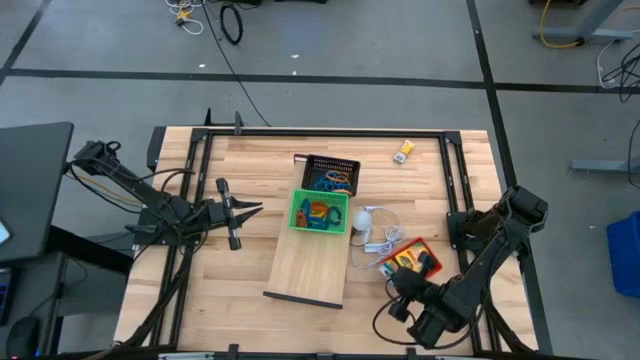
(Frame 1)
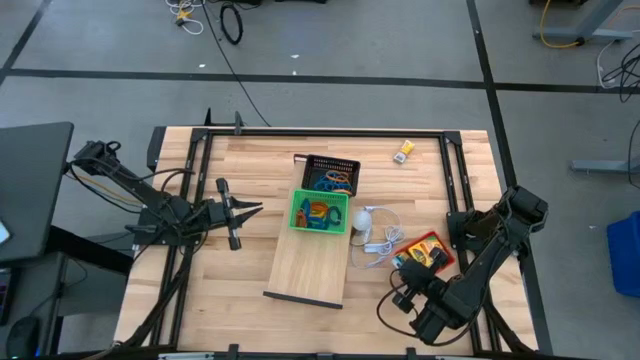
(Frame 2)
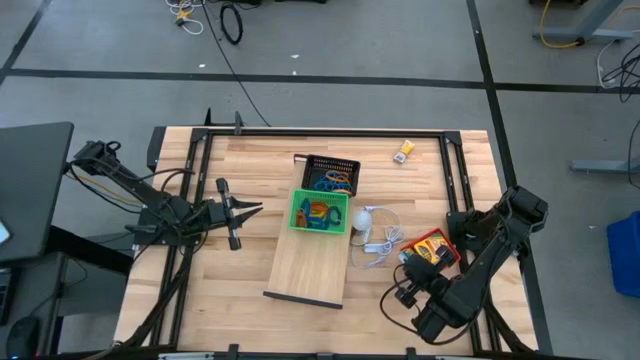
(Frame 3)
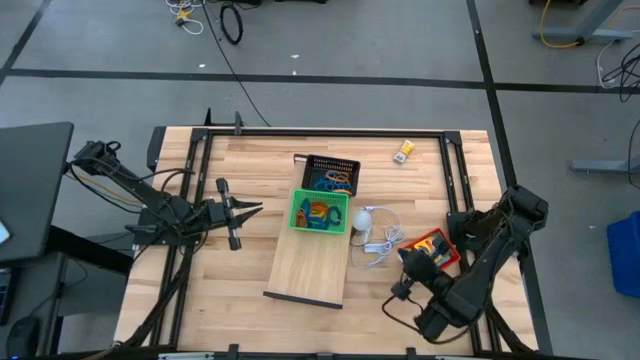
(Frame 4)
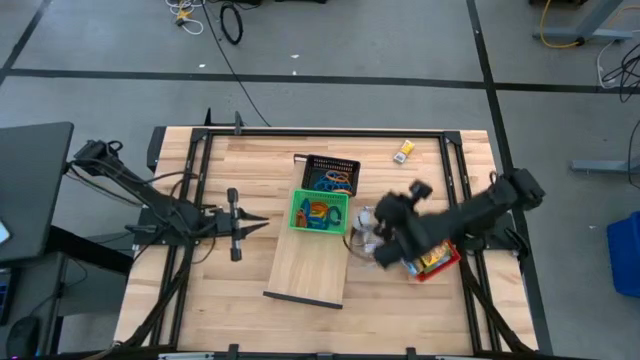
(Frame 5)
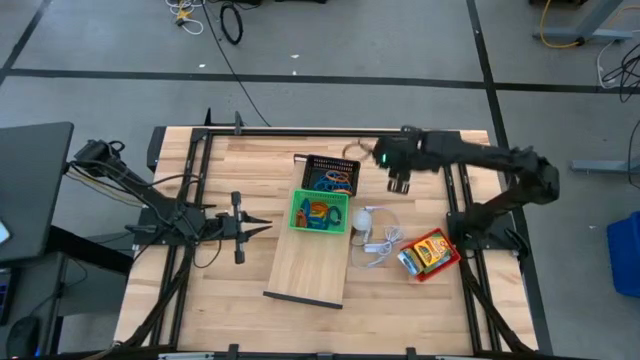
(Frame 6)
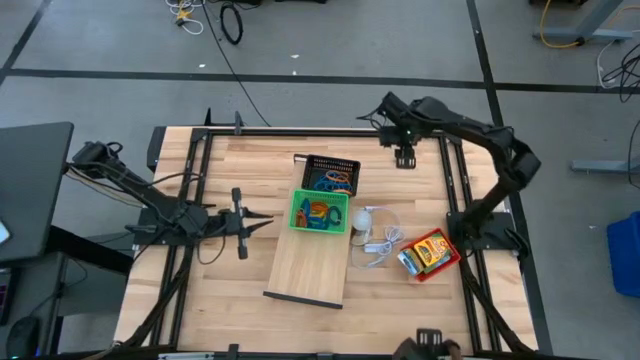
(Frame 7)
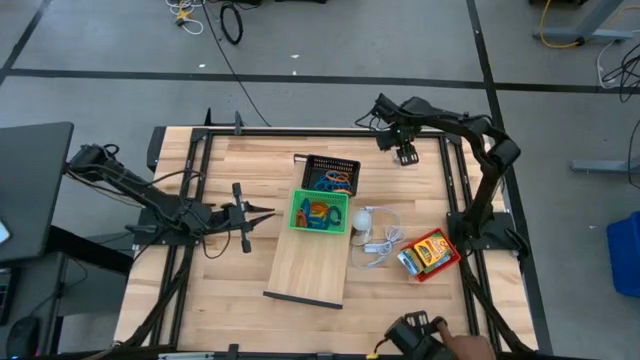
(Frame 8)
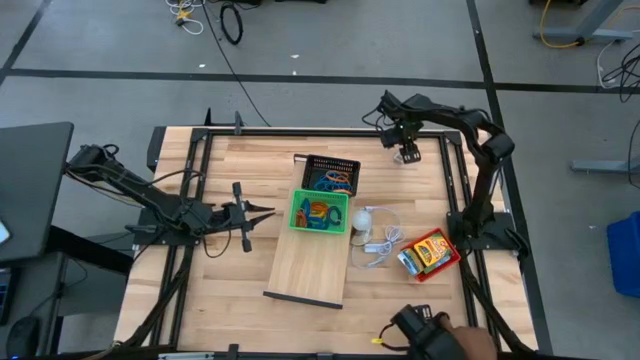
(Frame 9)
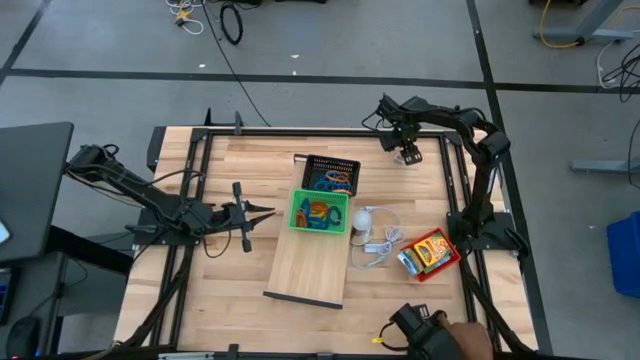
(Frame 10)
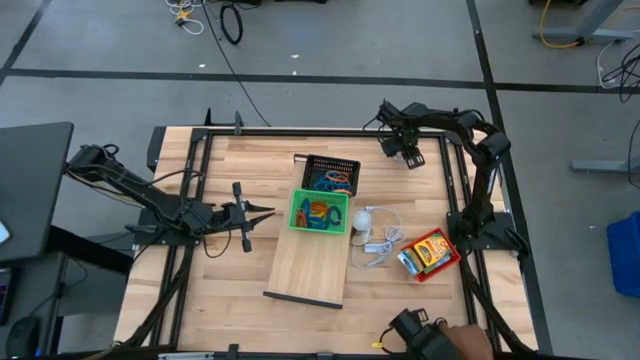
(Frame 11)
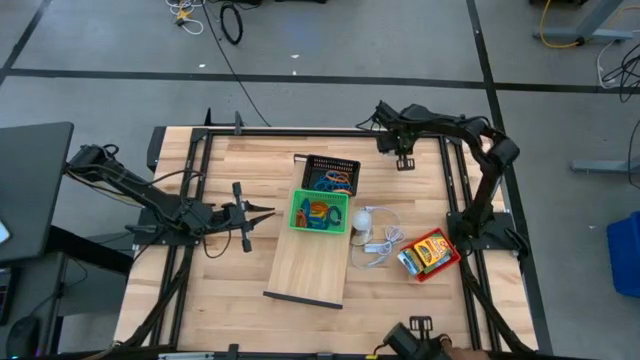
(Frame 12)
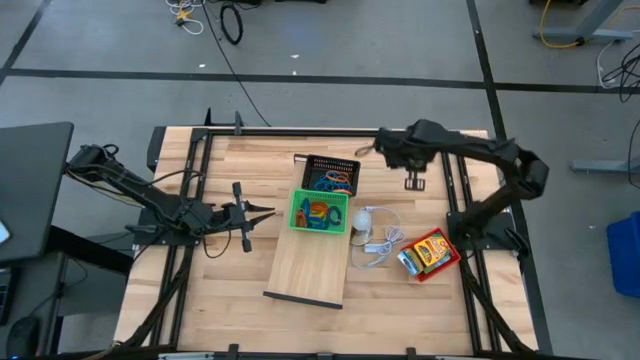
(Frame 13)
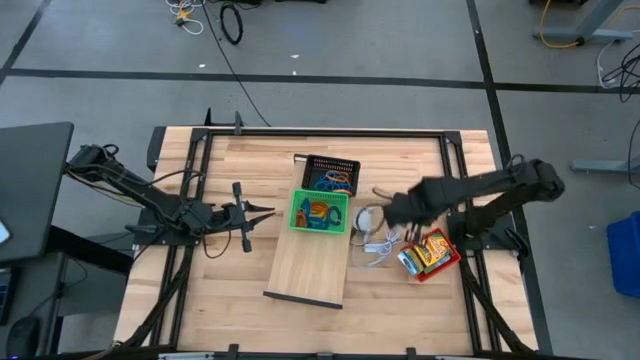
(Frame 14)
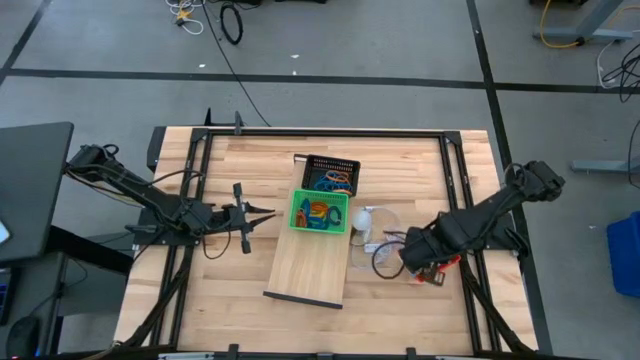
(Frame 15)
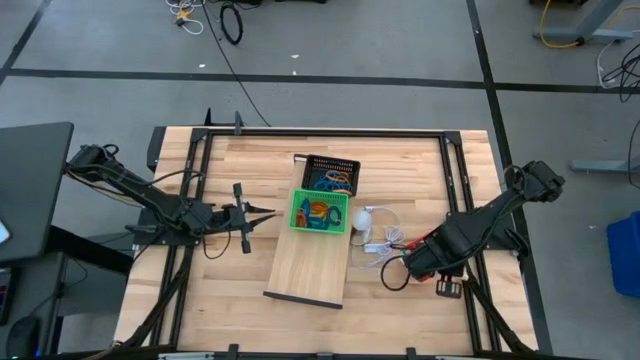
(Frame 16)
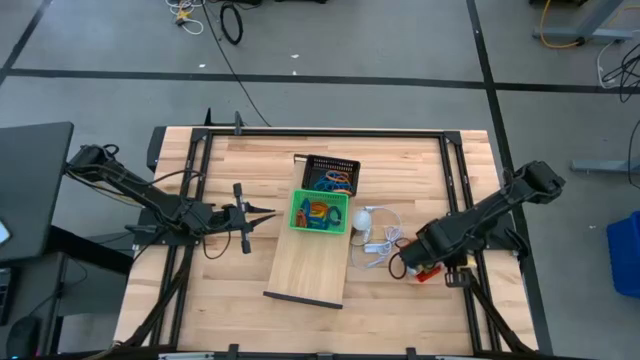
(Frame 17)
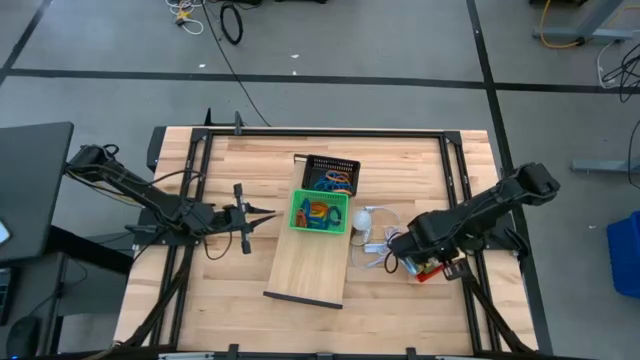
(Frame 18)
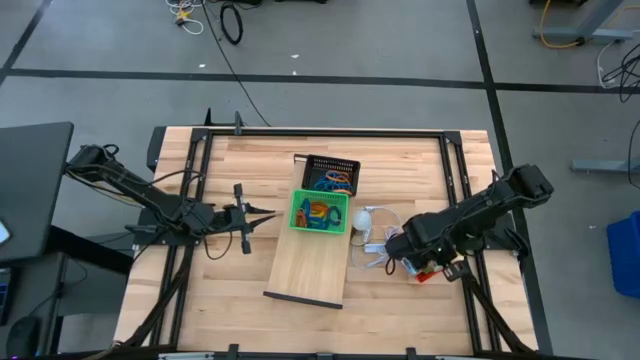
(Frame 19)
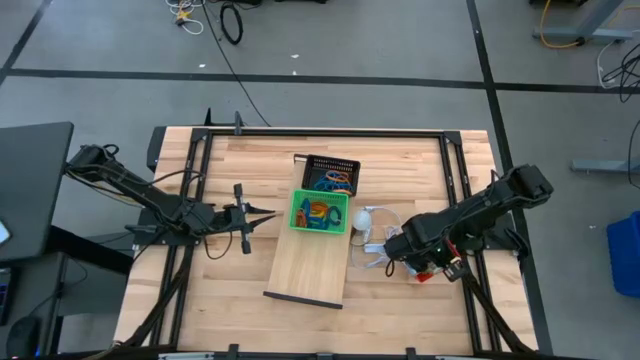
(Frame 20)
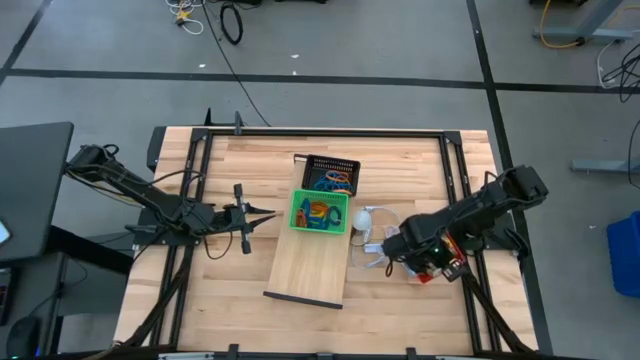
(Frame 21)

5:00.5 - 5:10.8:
Task: Pick & Place Office Desk Supplies
Put the bag of crayons into the red bin

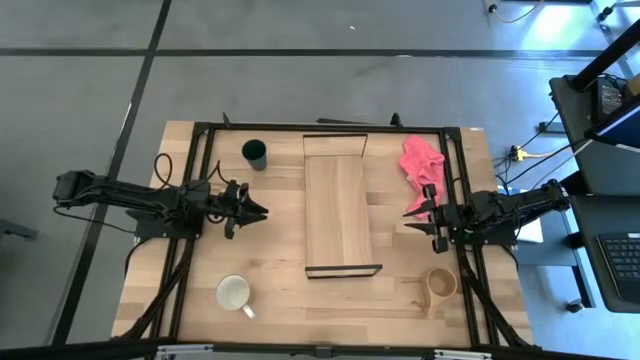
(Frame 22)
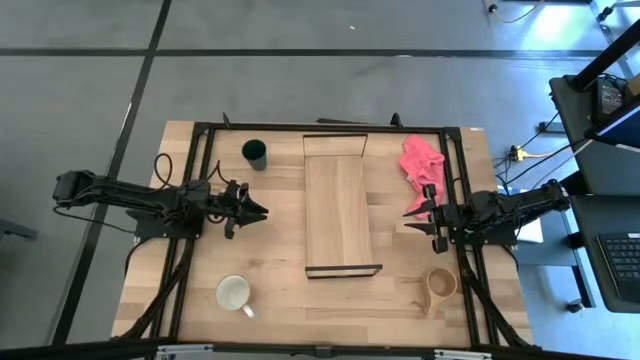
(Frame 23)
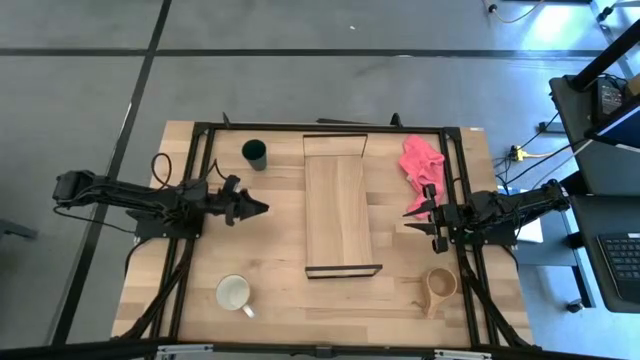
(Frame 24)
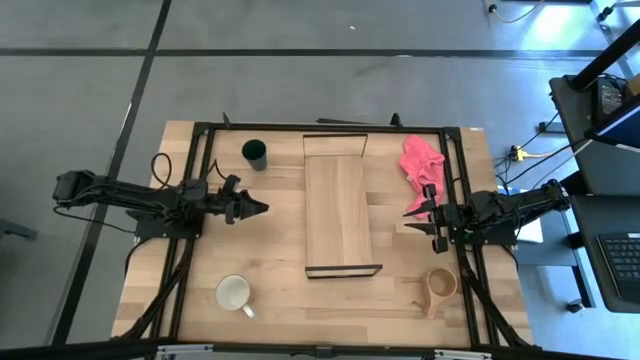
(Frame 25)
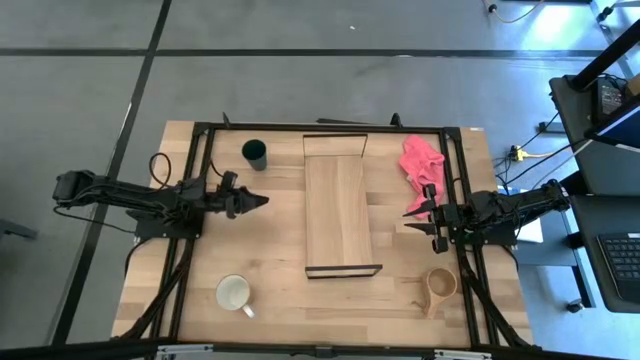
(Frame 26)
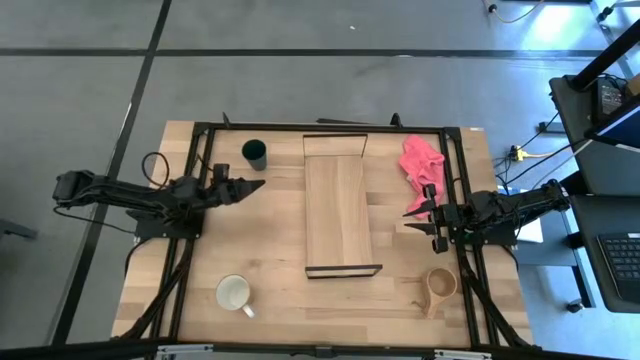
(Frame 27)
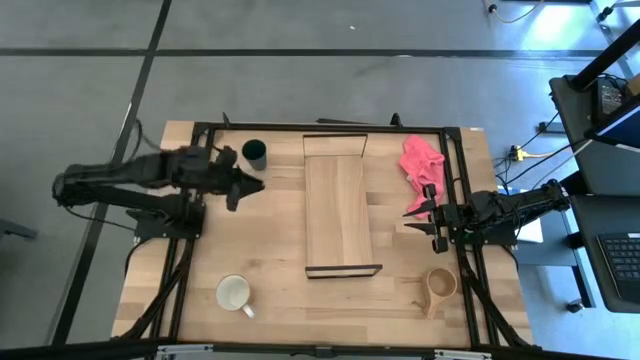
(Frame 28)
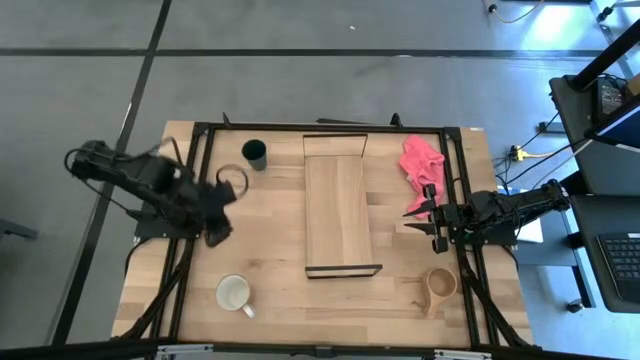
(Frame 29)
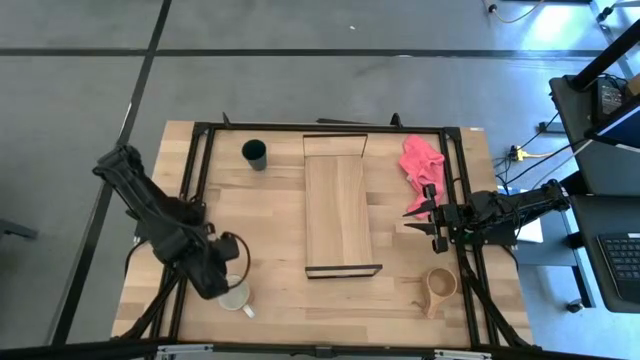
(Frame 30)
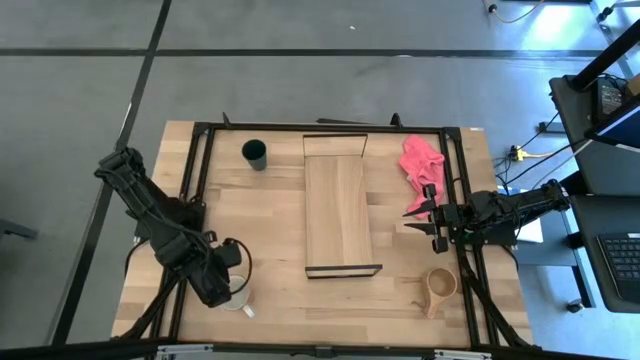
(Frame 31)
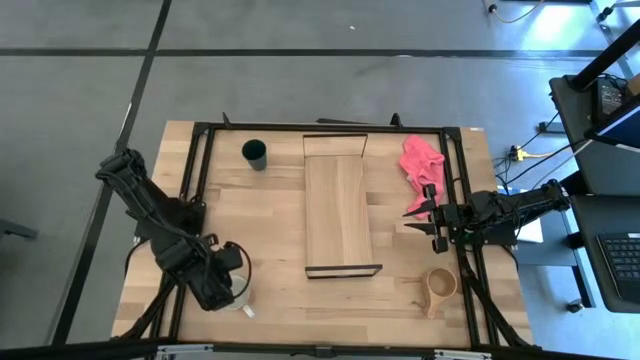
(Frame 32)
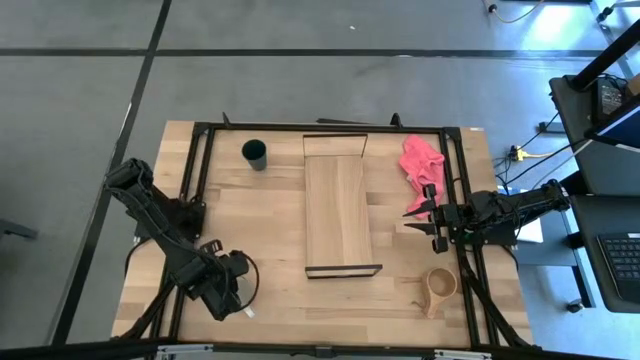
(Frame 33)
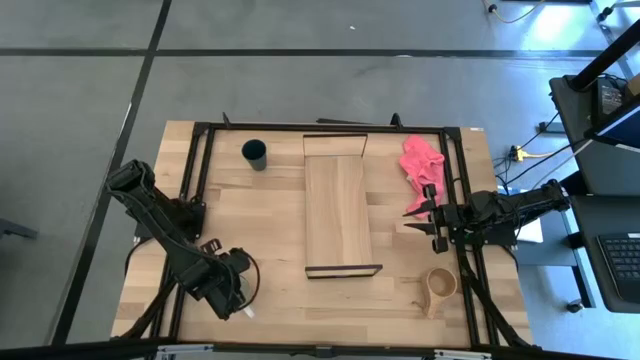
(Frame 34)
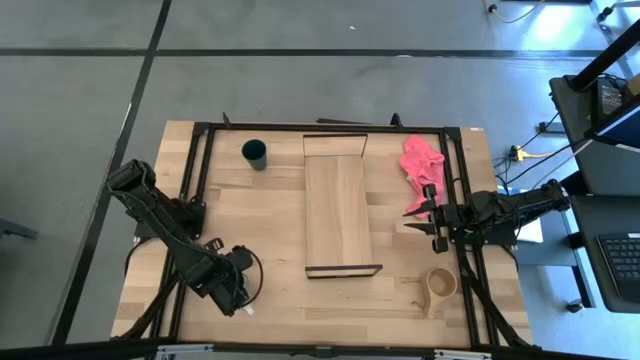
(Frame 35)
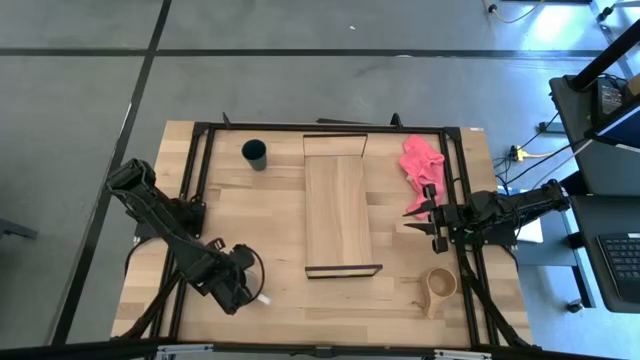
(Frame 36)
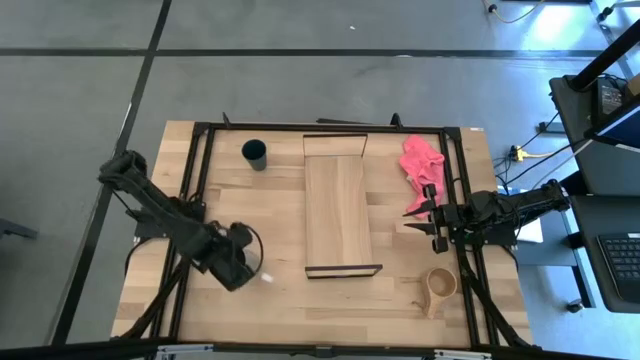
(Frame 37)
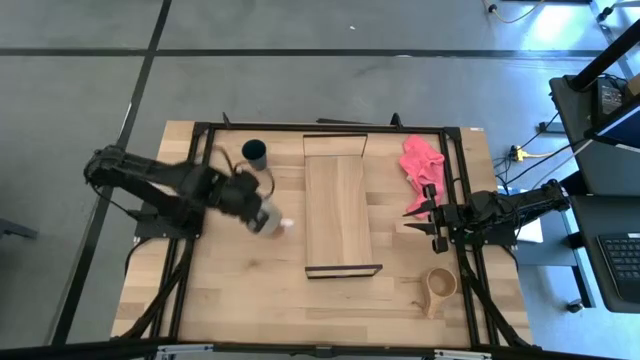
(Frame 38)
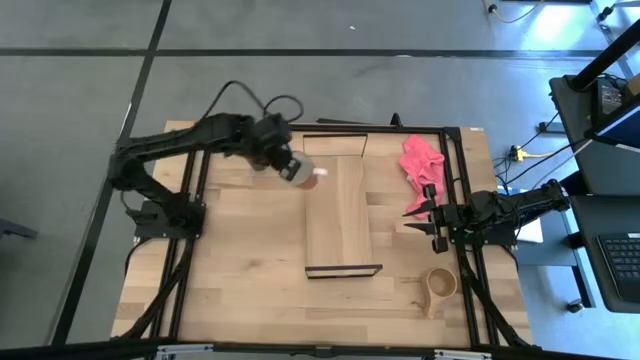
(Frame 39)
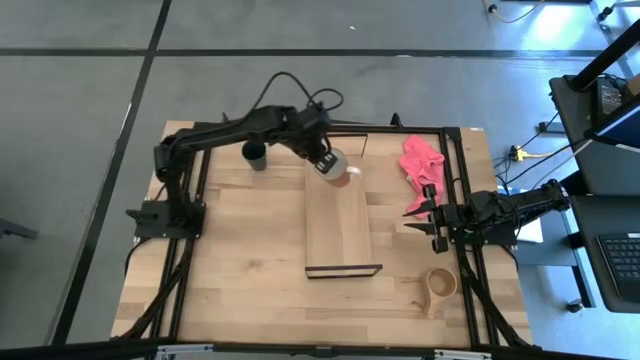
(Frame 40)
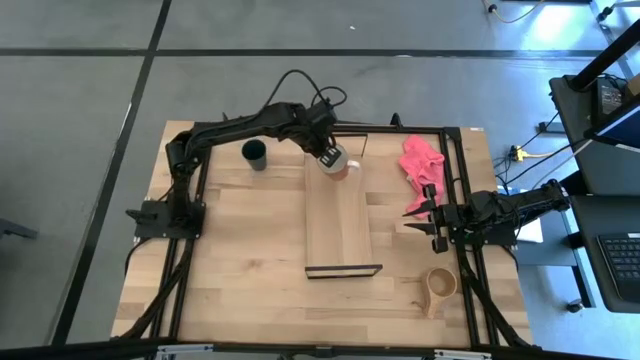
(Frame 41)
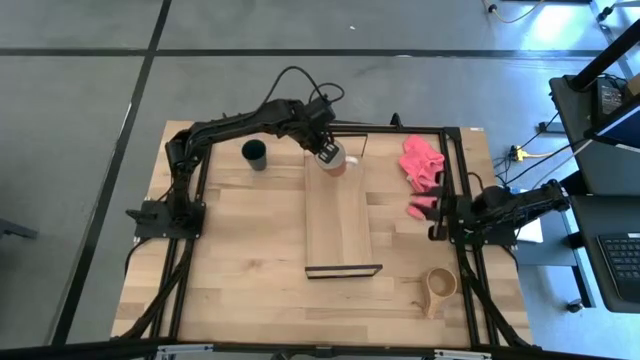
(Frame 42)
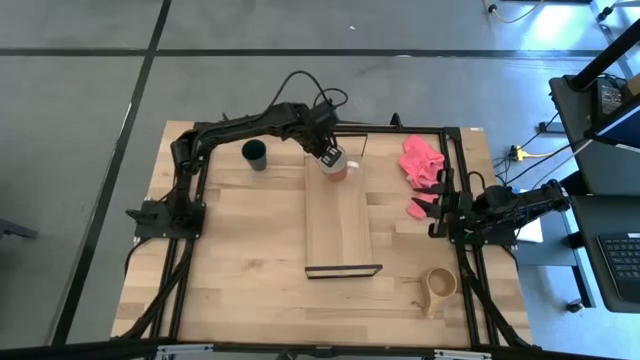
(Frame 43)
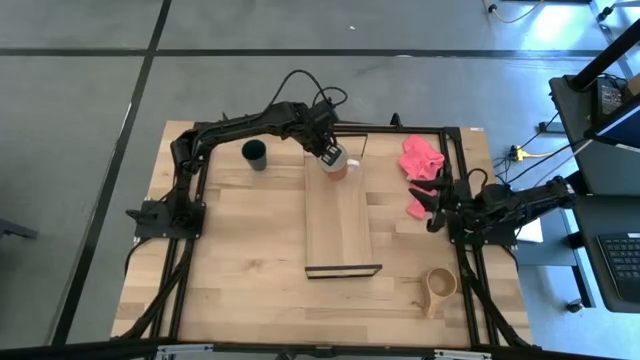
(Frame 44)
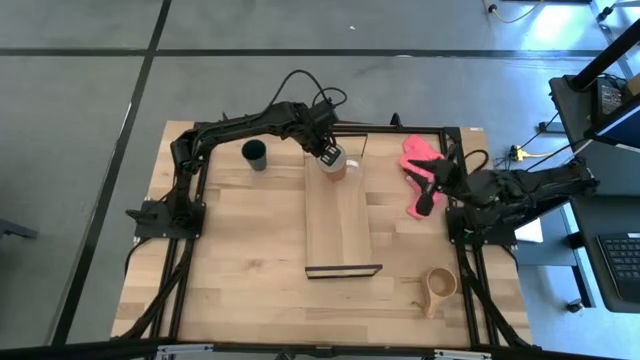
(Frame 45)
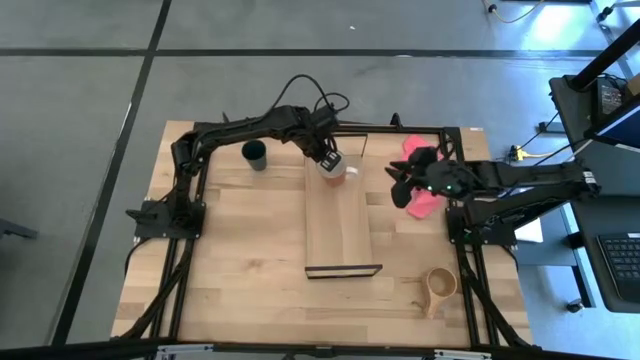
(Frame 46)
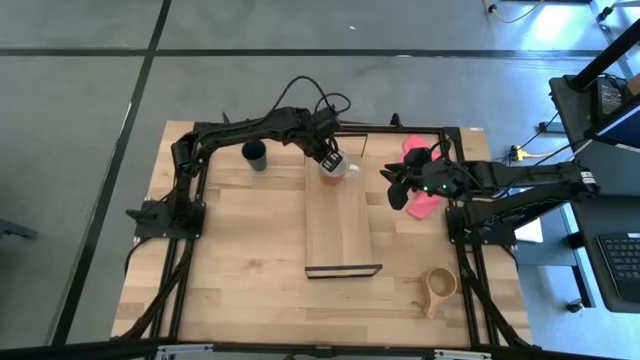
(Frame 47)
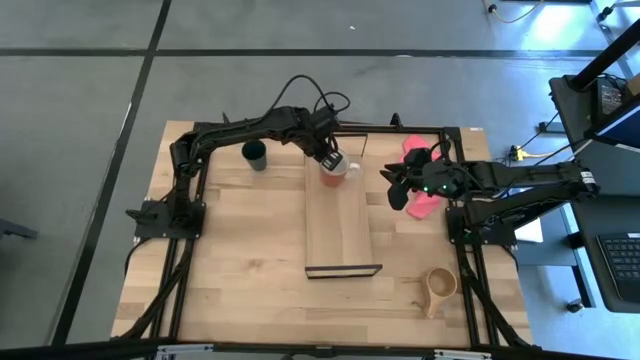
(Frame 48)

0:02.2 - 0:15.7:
Task: Stack small to large cups/mugs on shelf
Put the orange mug on the shelf
